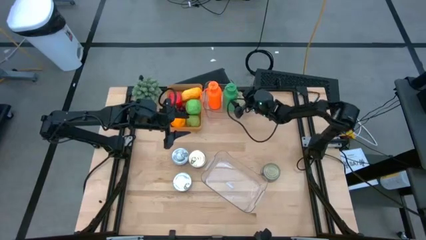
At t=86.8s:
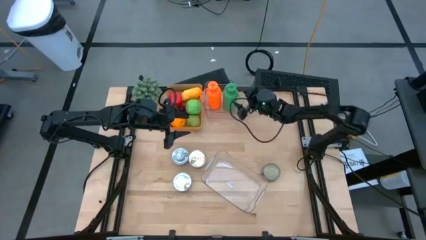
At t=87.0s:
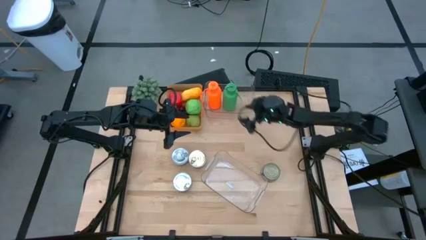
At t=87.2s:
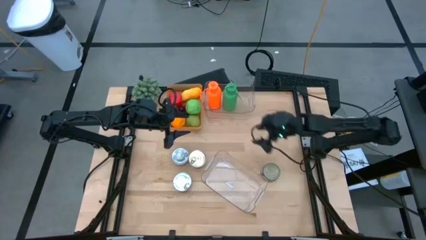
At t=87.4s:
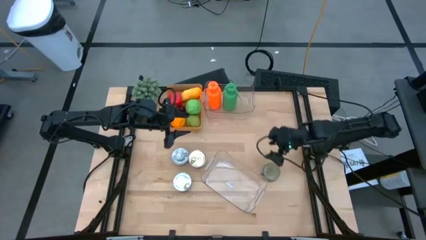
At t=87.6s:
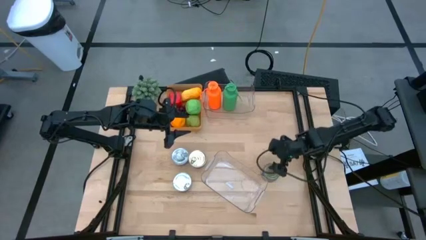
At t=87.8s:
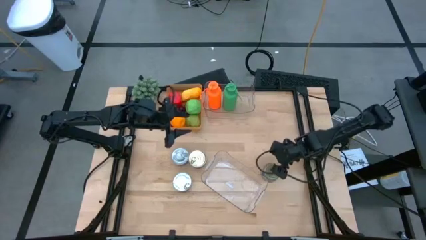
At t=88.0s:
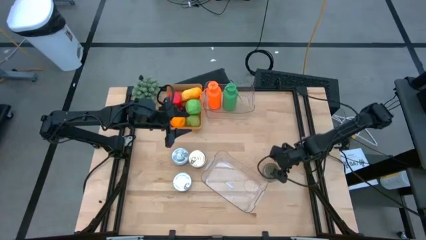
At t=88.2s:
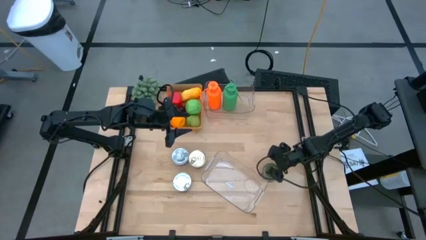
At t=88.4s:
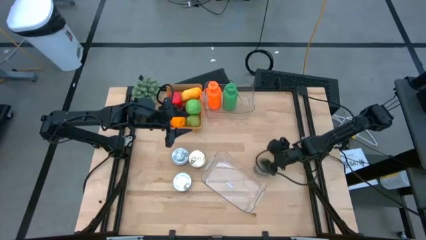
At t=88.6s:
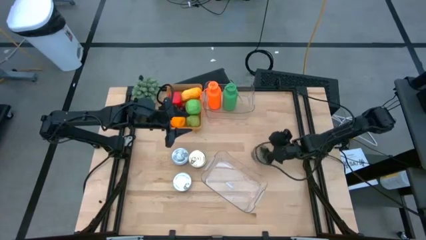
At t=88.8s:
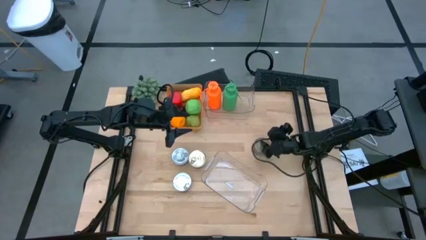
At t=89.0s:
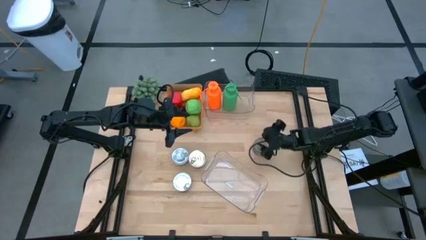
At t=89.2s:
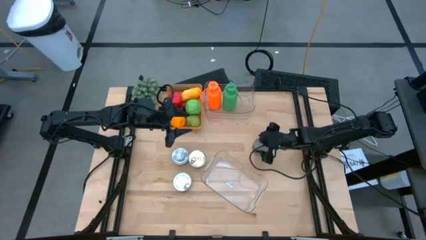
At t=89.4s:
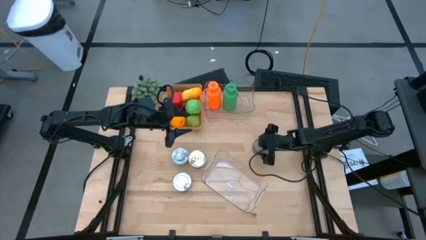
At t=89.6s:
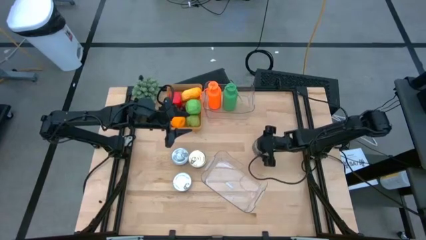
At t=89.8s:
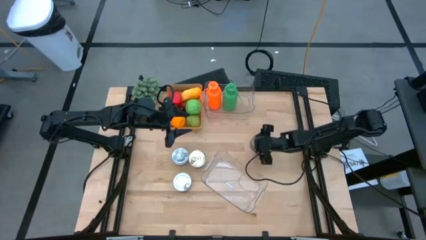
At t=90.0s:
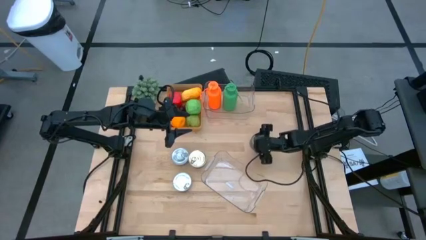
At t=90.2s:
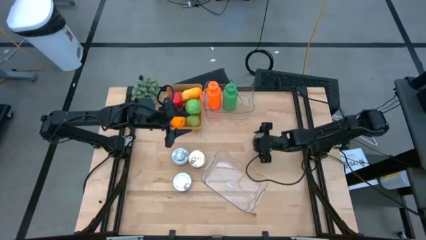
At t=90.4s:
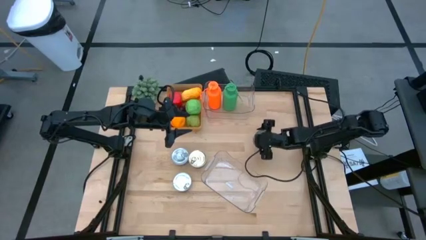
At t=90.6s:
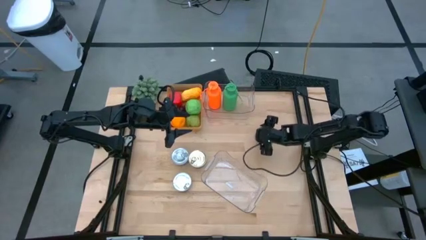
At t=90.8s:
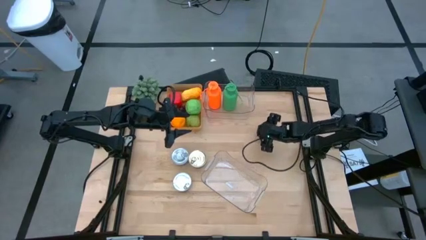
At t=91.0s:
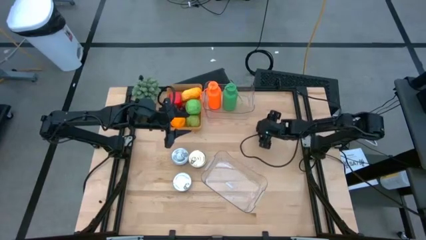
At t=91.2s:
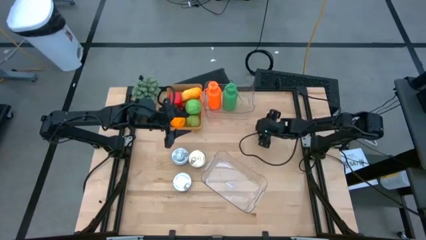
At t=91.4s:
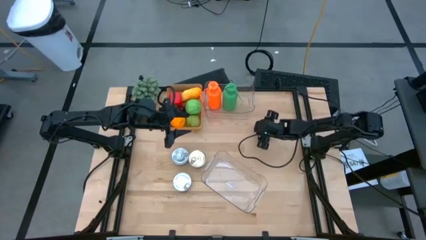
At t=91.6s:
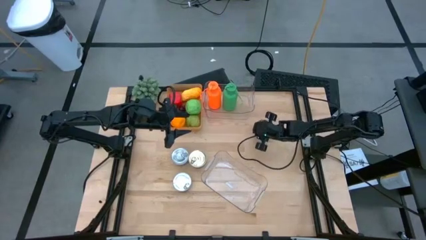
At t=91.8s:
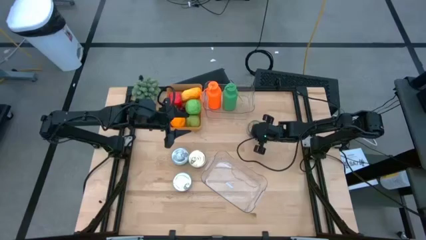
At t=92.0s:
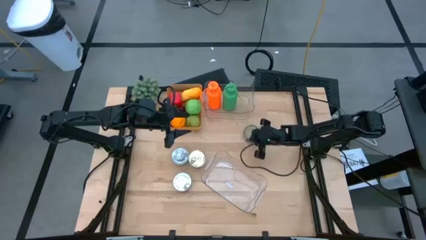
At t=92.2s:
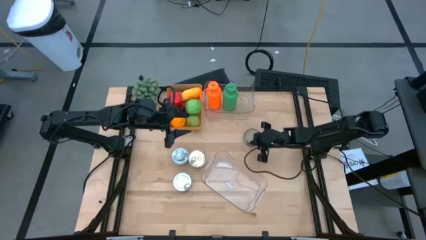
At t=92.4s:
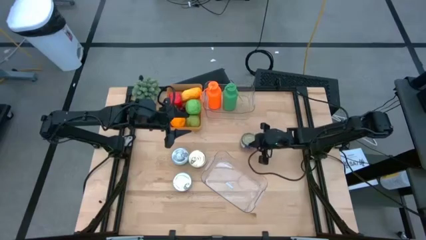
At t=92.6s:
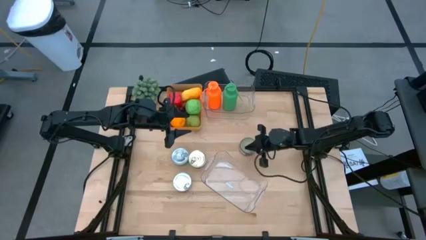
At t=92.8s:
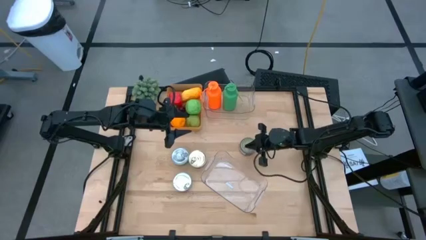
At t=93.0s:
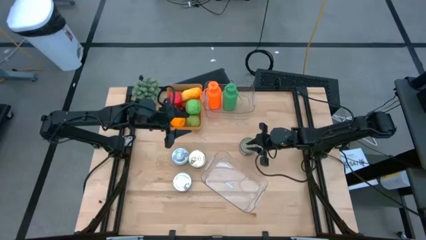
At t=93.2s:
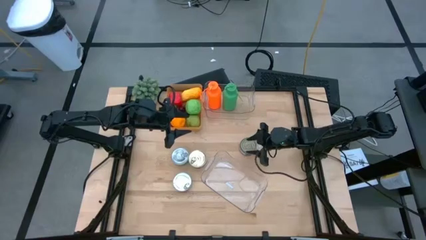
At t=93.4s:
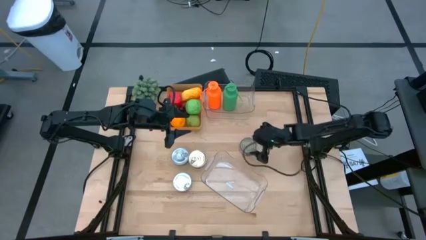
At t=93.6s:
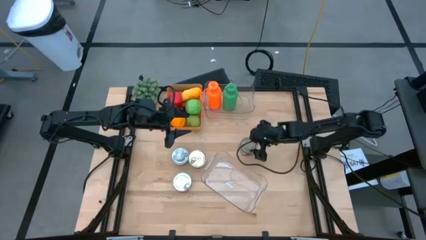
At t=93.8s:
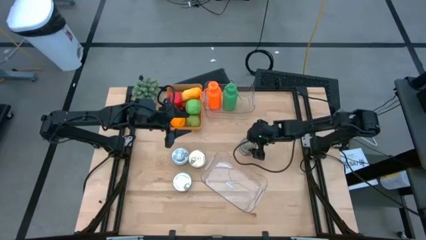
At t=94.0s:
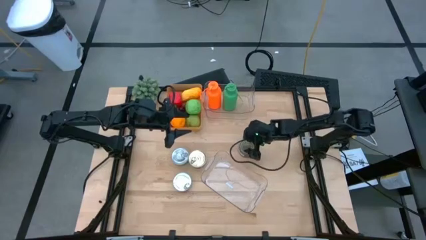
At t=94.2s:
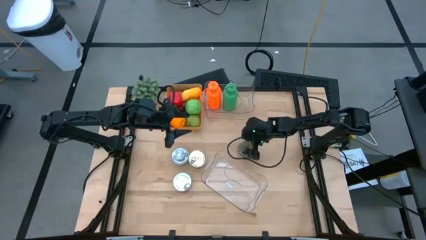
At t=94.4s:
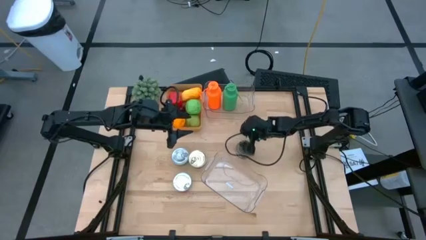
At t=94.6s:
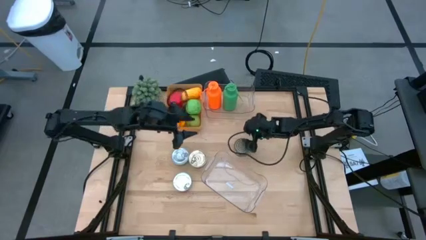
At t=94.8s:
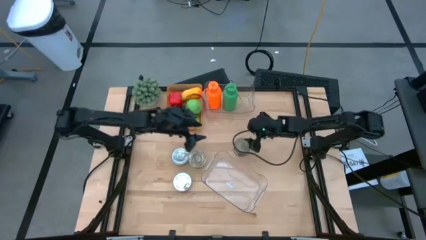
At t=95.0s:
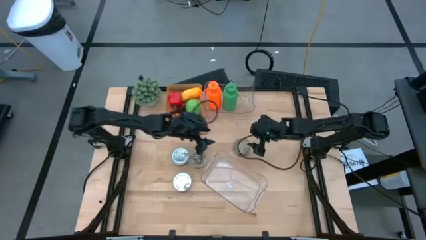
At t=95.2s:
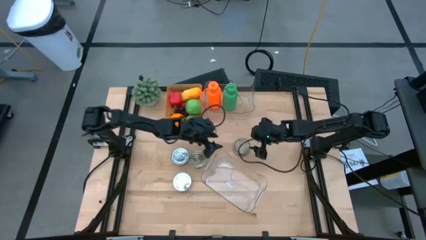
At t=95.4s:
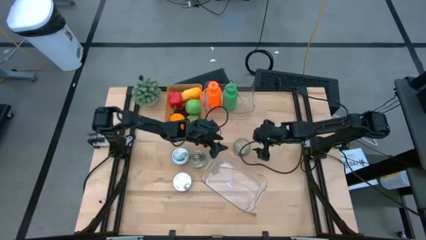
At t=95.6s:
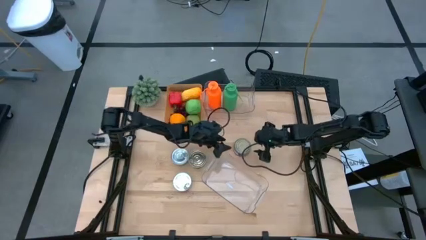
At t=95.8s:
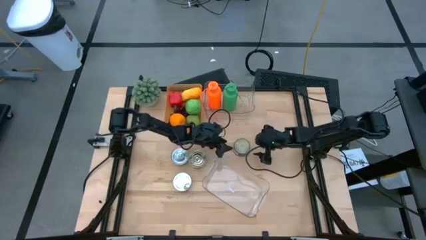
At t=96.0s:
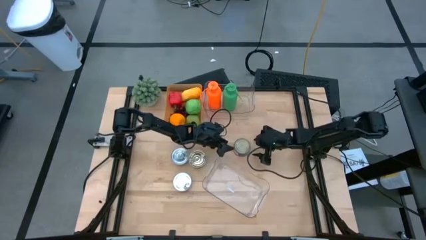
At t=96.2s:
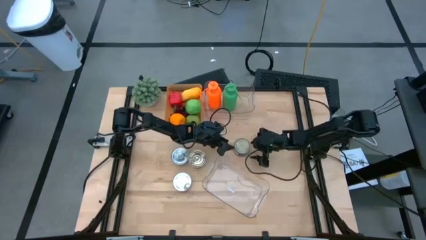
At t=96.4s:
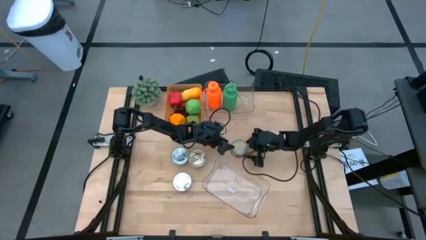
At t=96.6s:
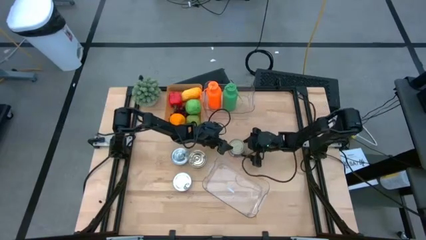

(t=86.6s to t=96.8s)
Task: Pick & Place Food Item
Put the right blue pink tuna can into the bottom transparent bin

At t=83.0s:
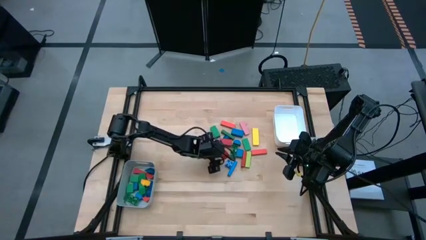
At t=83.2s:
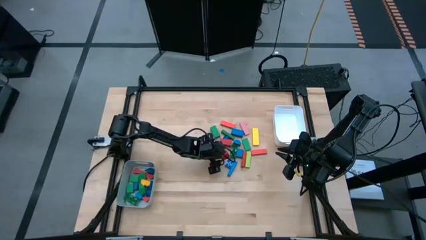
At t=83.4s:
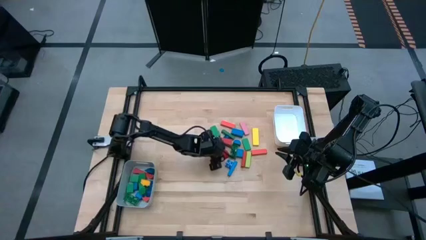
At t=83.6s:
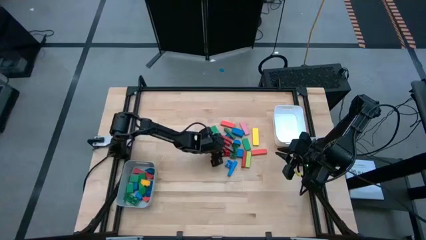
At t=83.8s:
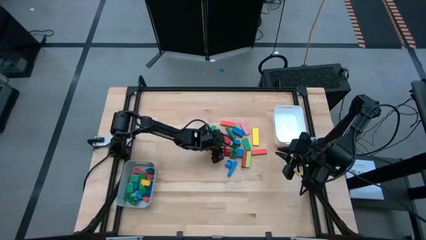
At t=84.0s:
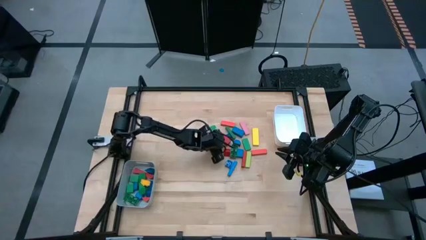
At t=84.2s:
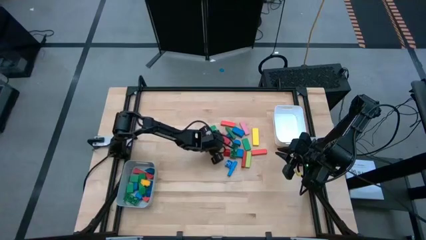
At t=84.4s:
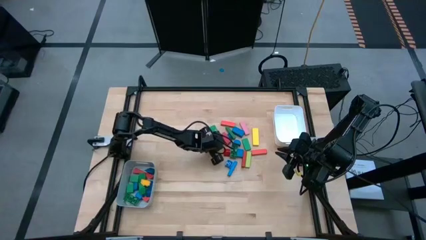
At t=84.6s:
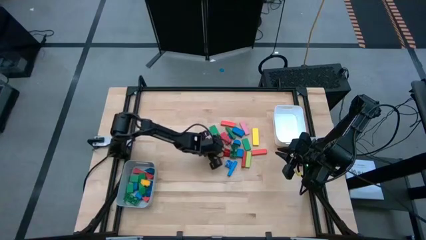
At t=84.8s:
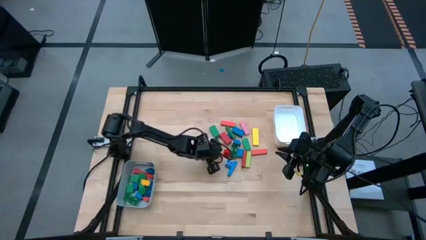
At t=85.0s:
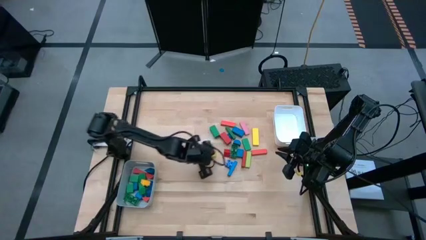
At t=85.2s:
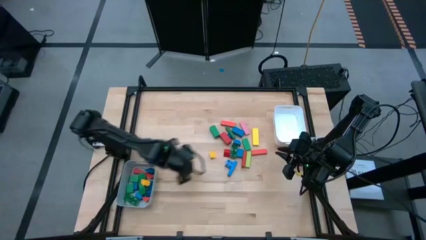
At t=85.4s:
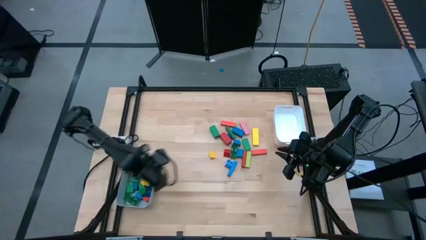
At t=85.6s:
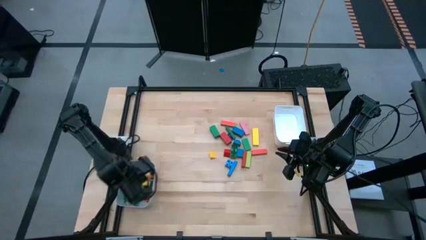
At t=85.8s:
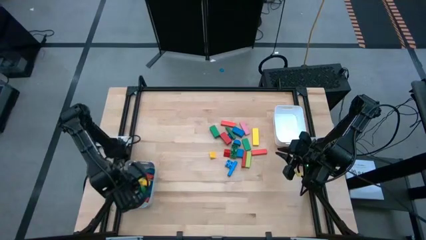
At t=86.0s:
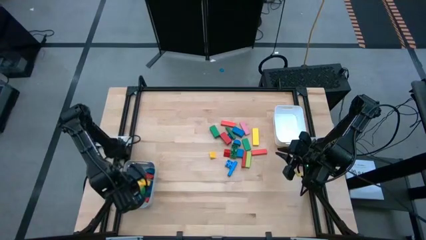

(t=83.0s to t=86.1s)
Task: Sort blocks by size
Put the yellow triangle block into the gray bin

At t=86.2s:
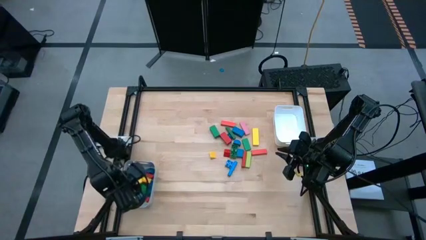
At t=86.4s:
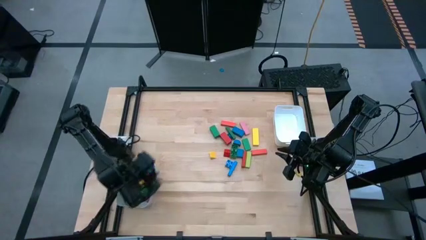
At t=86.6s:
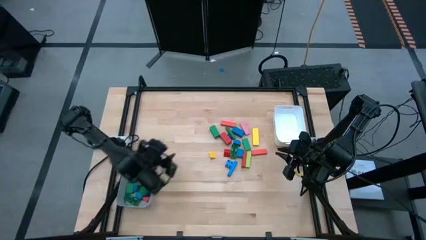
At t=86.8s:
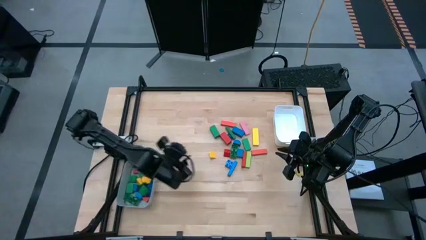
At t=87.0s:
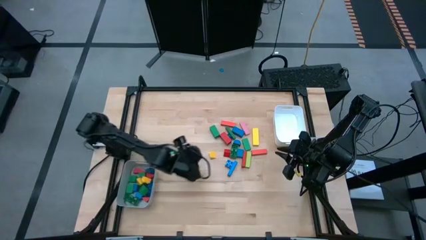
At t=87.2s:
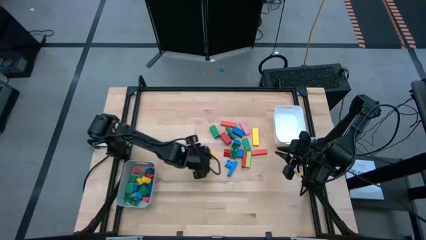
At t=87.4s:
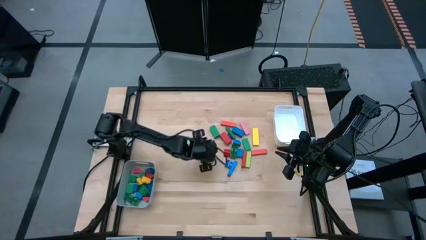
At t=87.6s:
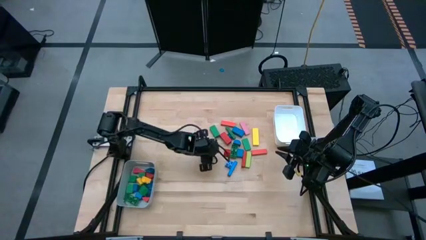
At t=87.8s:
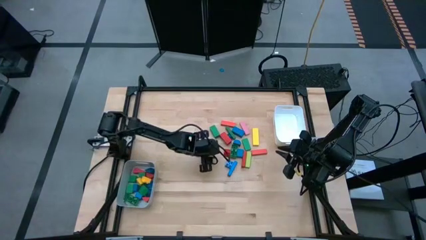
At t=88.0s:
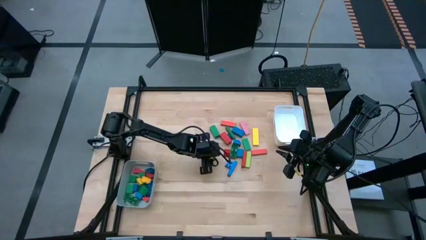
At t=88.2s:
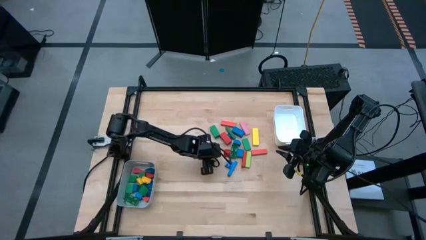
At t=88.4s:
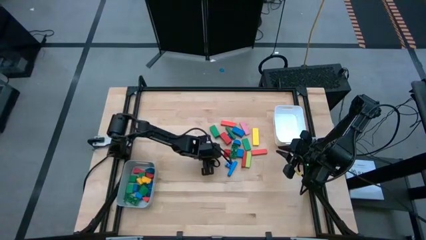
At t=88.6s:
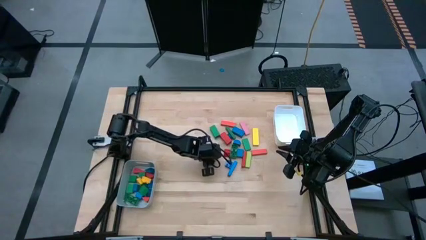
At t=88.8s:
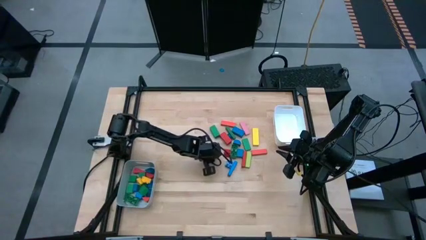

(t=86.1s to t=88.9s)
Put the yellow triangle block into the gray bin
